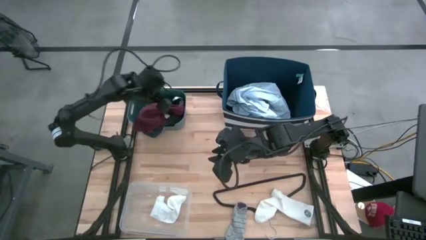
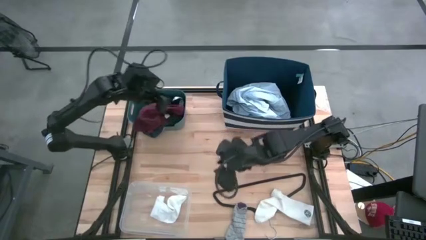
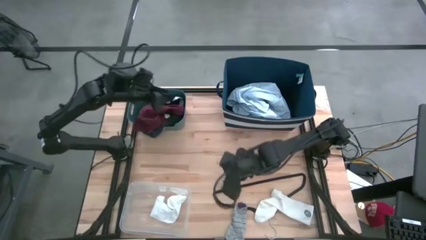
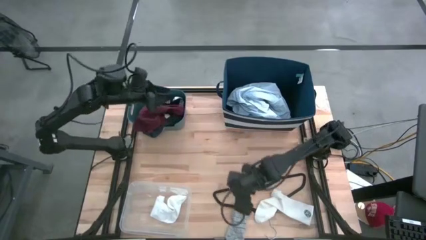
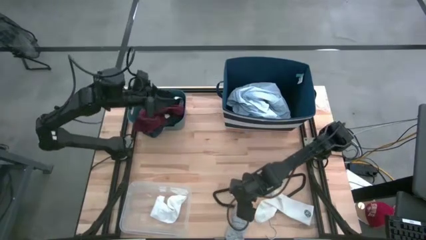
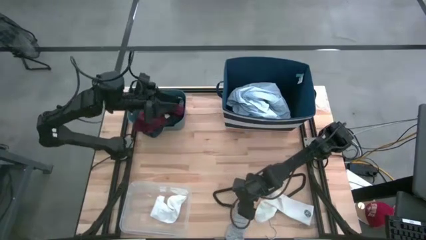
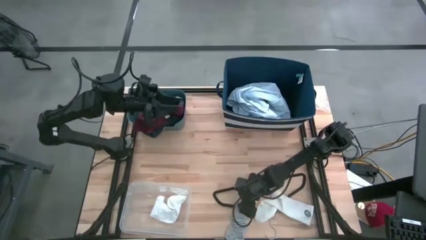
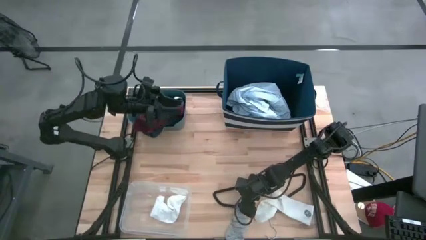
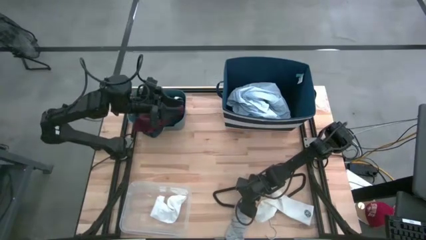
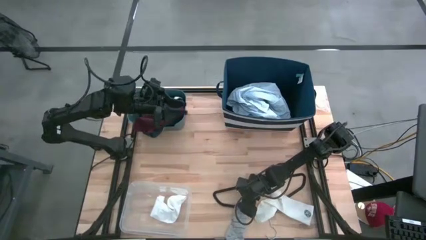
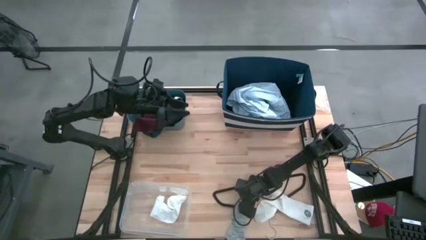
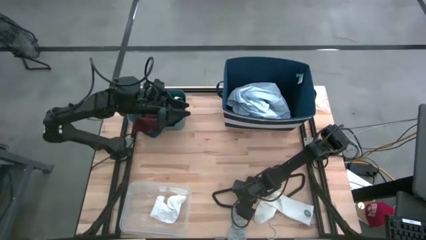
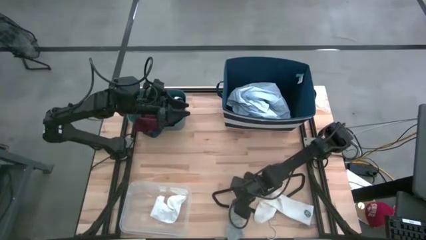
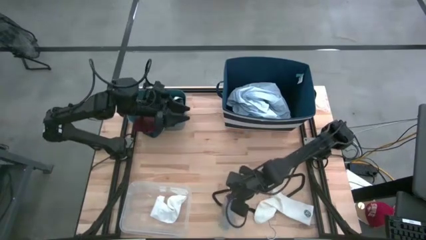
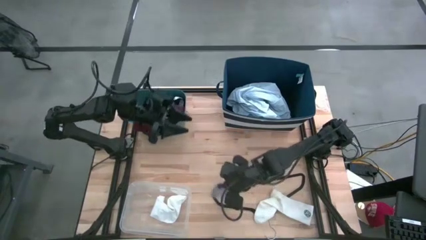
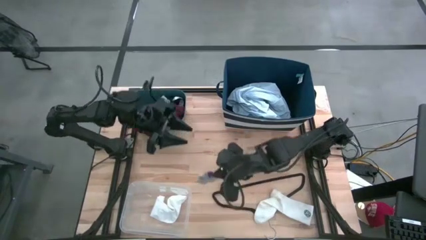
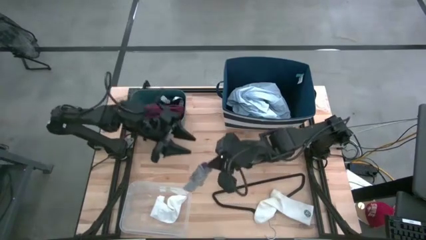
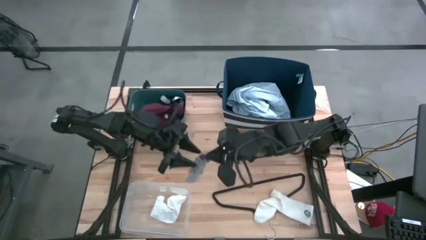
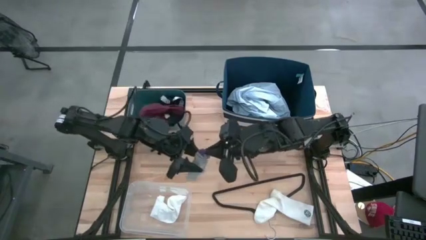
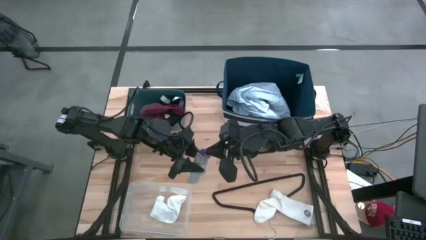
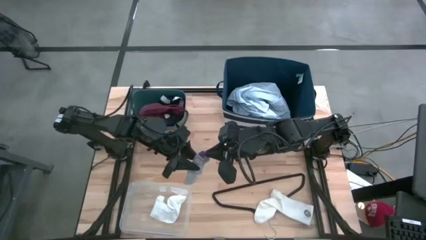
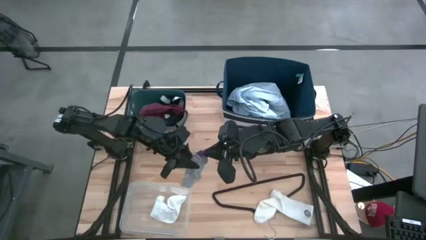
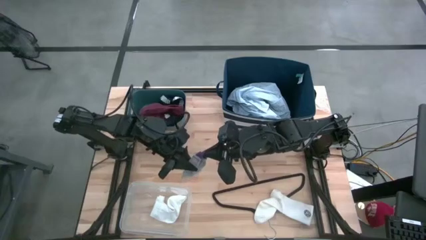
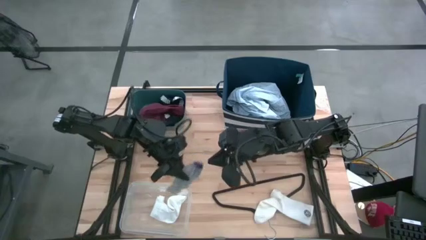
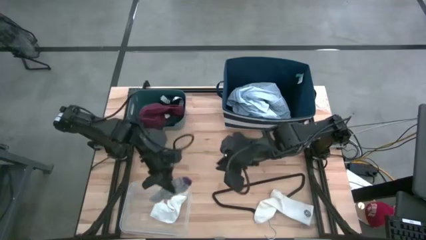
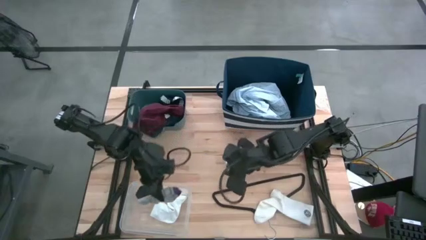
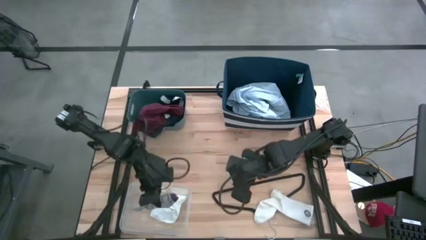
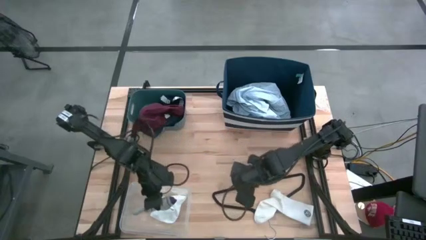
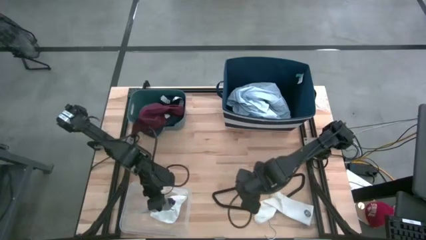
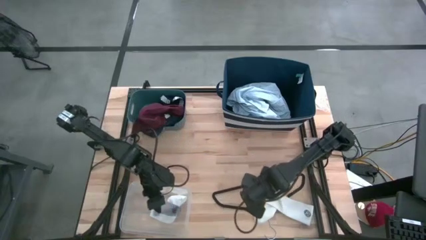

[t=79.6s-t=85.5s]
Task: Pick & Place Cloths
Put the gray sock into the transparent bin

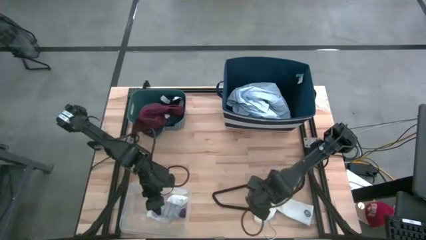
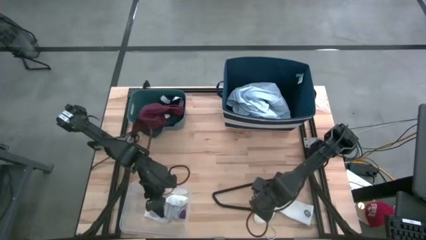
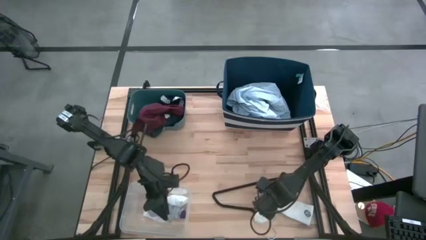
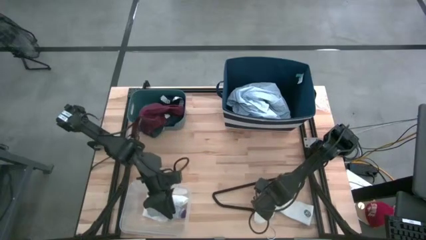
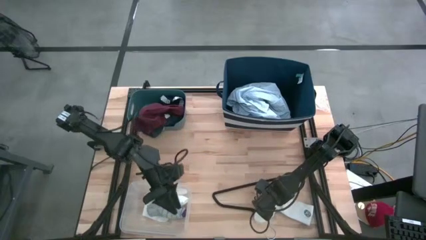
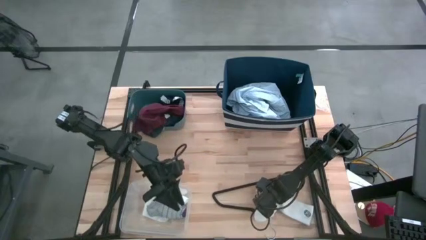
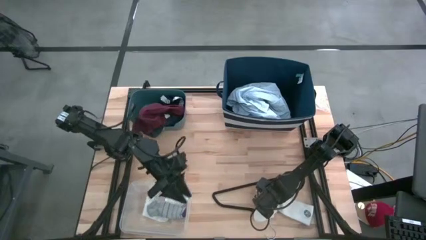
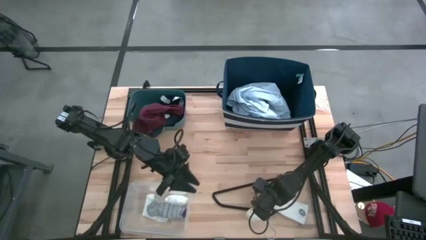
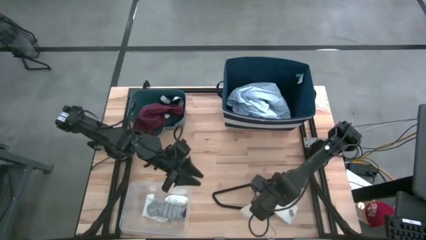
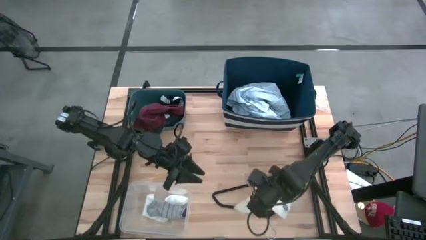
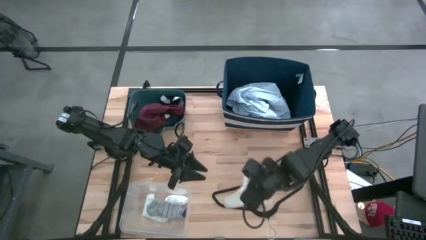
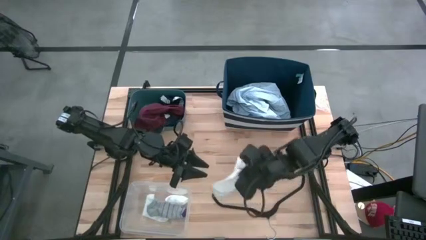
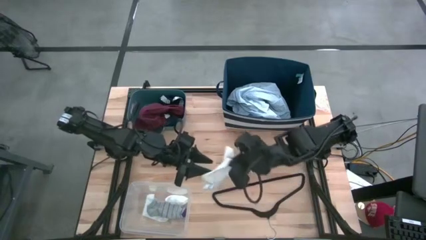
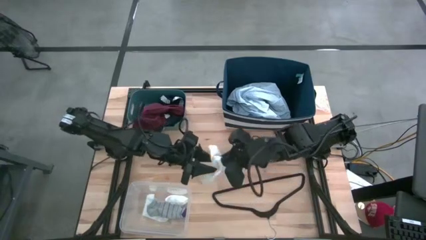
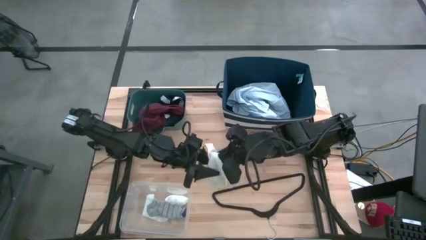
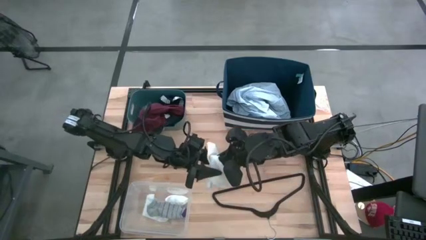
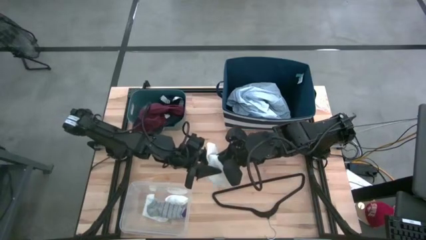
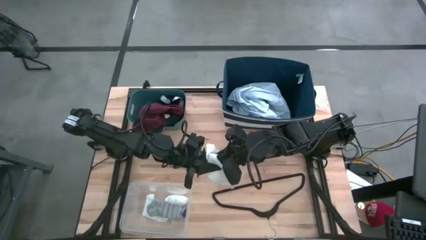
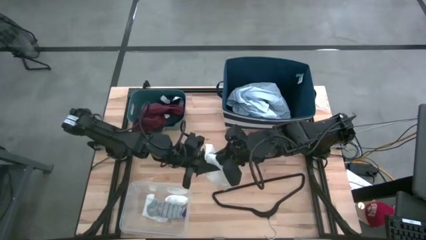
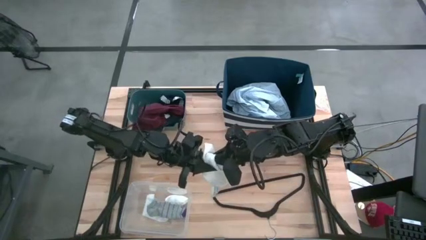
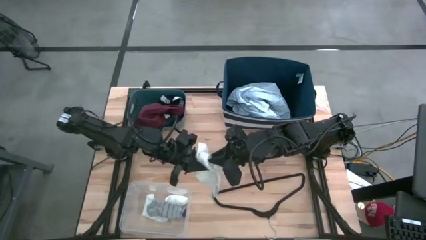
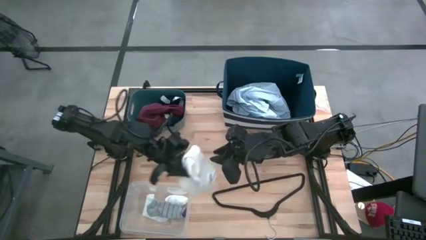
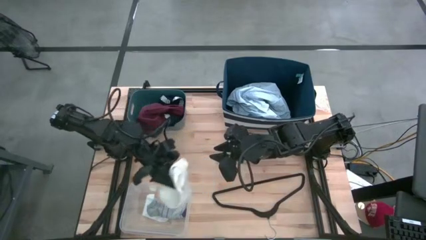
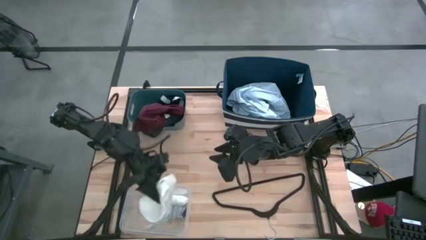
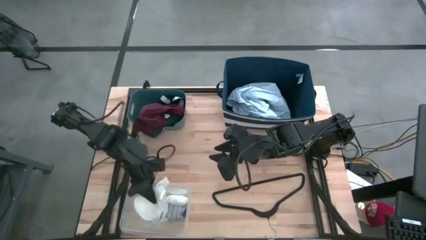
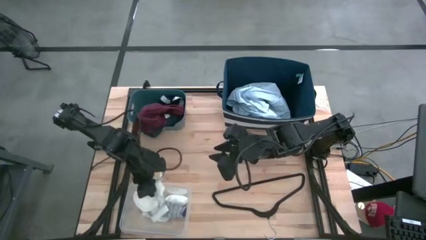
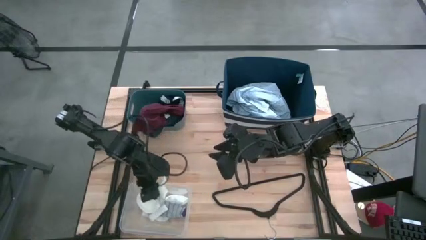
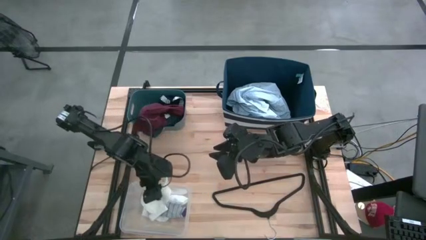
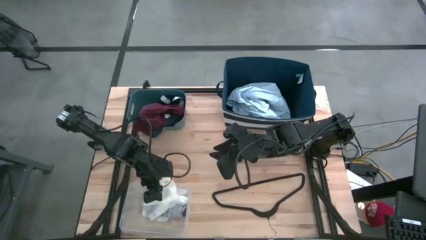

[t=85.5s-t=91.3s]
Put the white sock into the transparent bin
